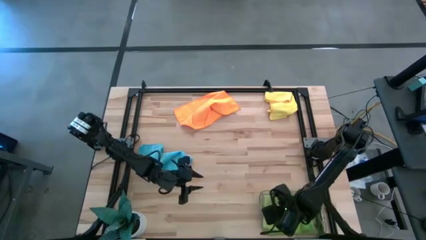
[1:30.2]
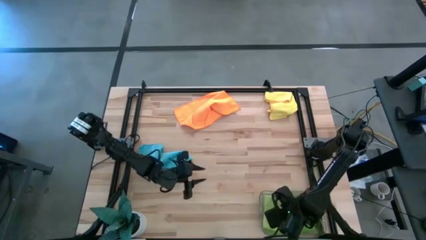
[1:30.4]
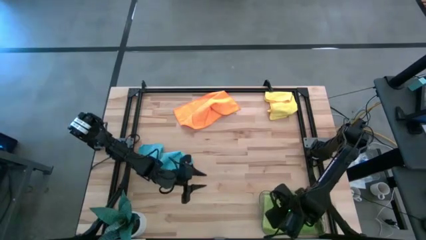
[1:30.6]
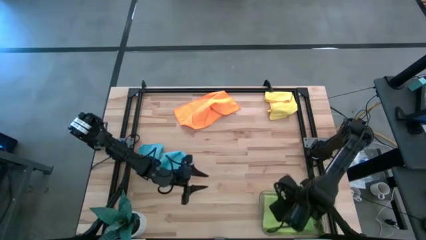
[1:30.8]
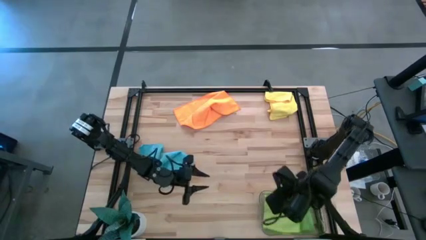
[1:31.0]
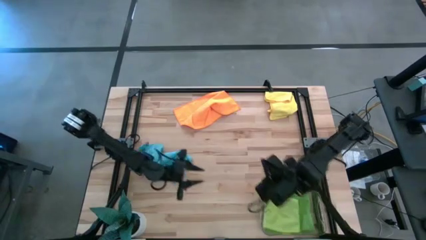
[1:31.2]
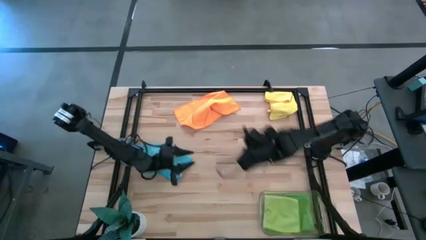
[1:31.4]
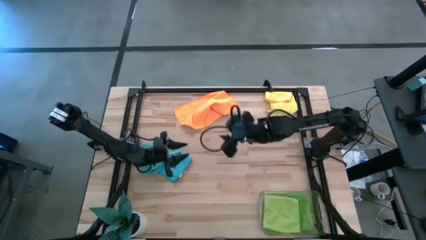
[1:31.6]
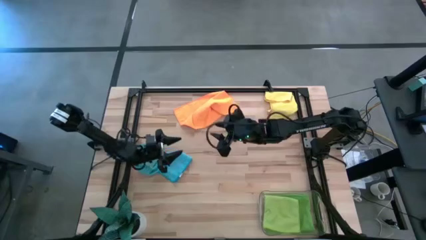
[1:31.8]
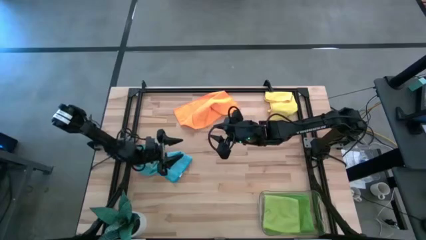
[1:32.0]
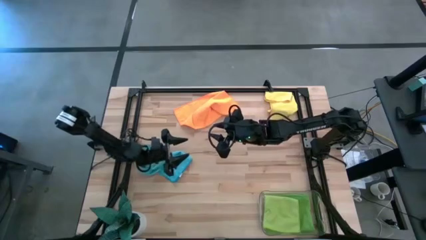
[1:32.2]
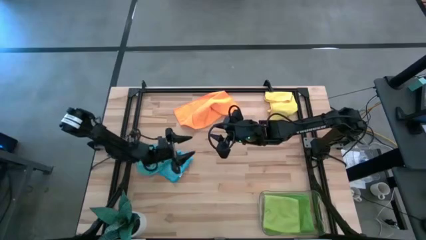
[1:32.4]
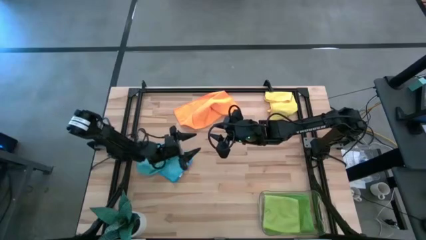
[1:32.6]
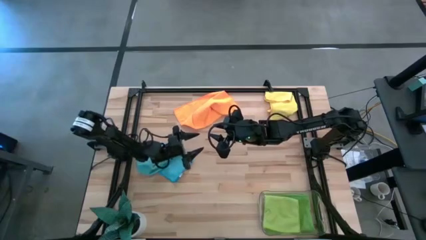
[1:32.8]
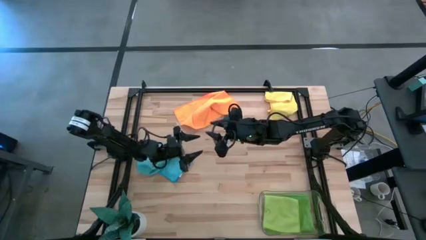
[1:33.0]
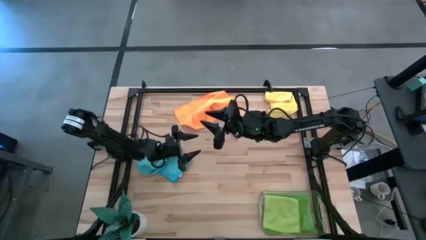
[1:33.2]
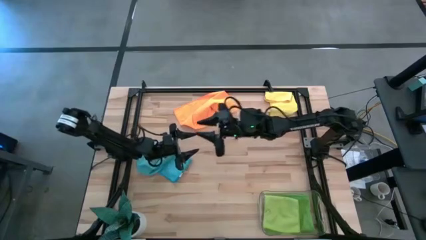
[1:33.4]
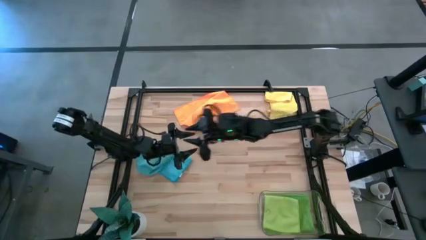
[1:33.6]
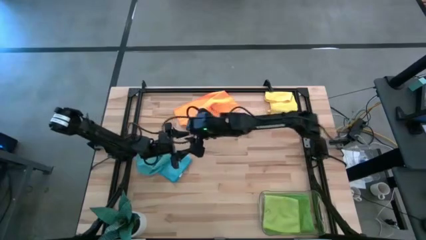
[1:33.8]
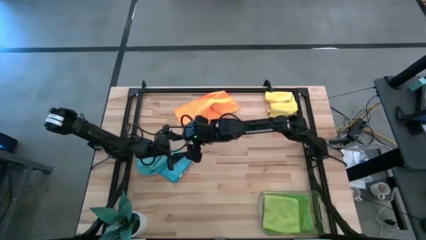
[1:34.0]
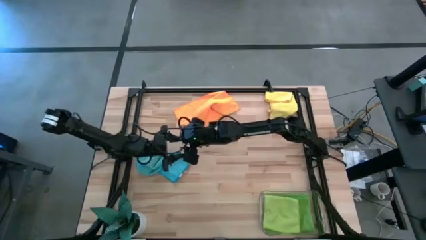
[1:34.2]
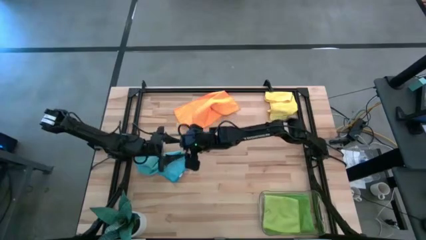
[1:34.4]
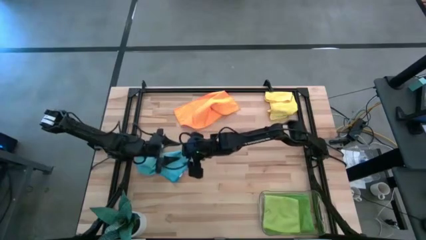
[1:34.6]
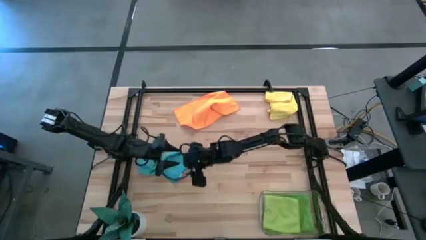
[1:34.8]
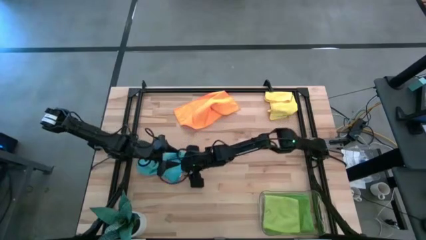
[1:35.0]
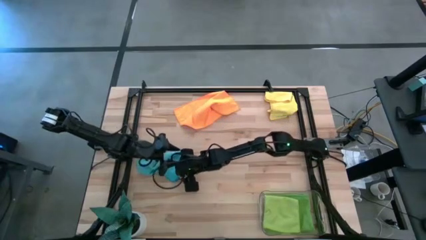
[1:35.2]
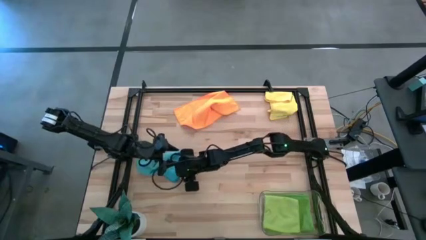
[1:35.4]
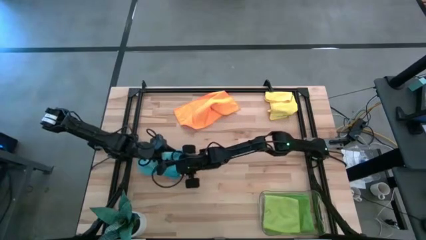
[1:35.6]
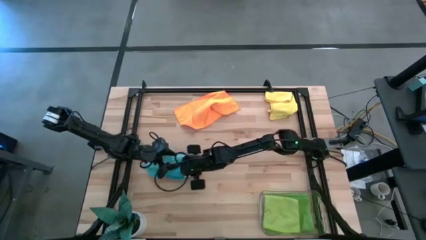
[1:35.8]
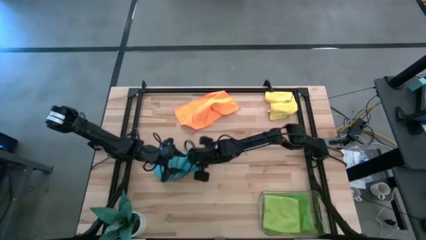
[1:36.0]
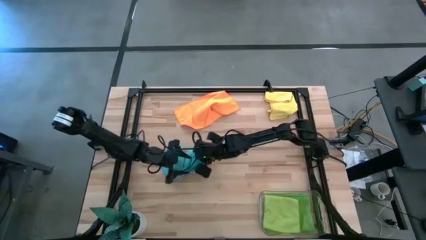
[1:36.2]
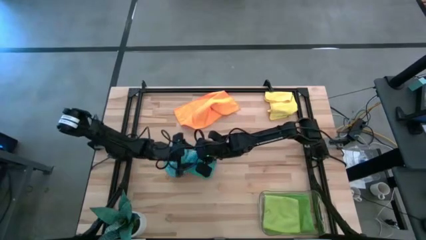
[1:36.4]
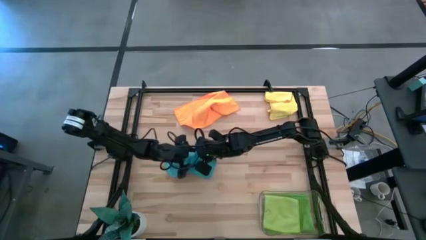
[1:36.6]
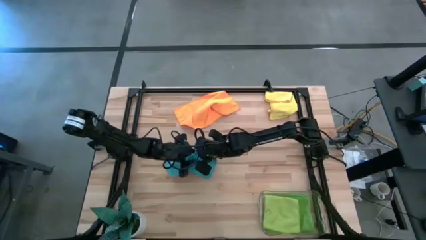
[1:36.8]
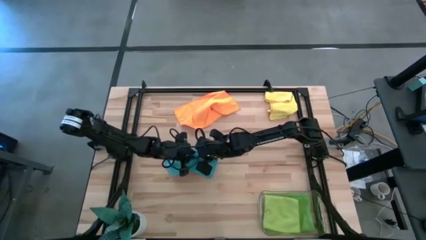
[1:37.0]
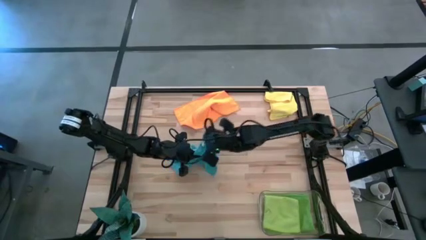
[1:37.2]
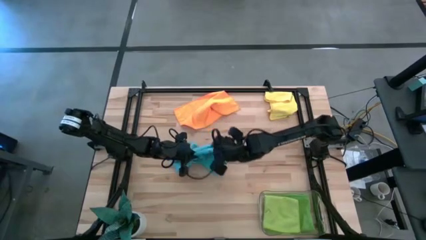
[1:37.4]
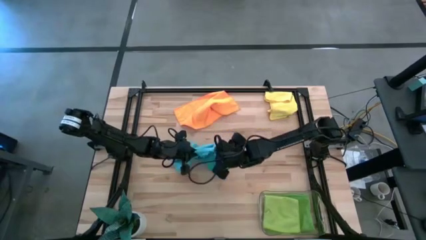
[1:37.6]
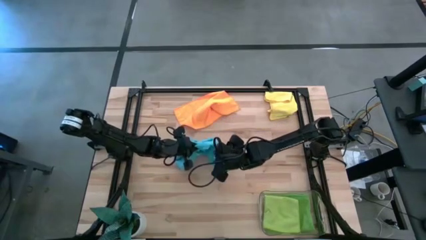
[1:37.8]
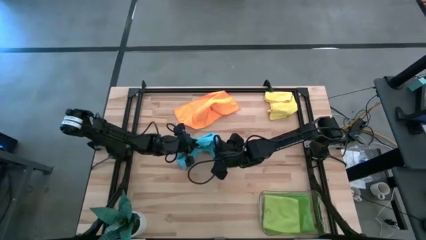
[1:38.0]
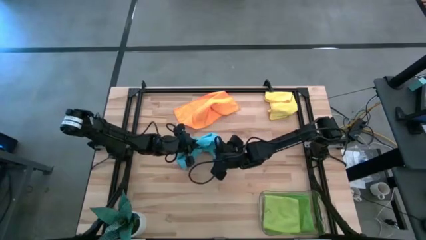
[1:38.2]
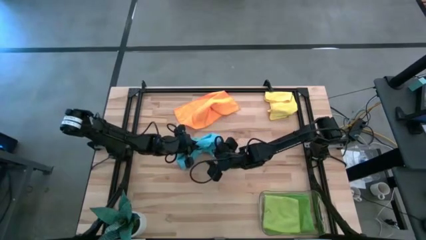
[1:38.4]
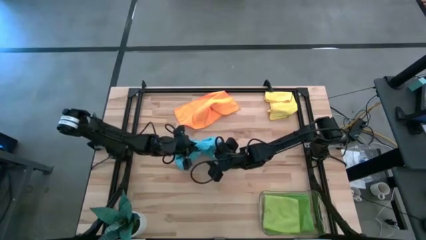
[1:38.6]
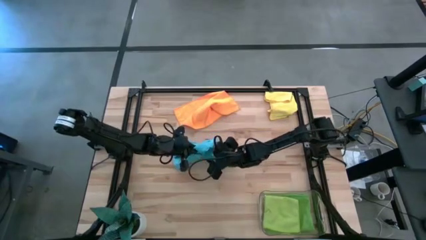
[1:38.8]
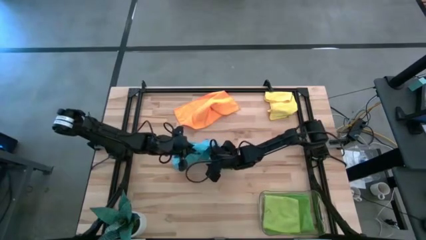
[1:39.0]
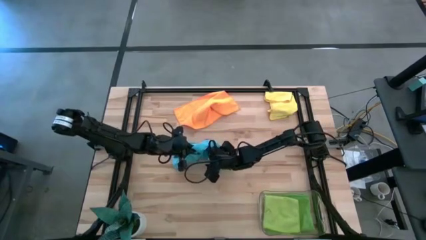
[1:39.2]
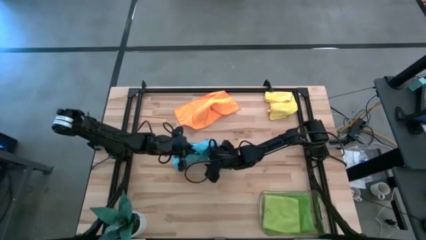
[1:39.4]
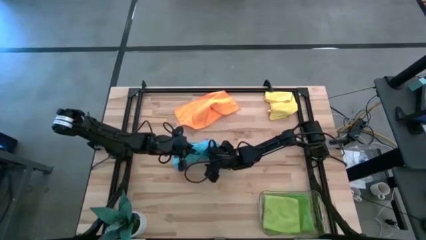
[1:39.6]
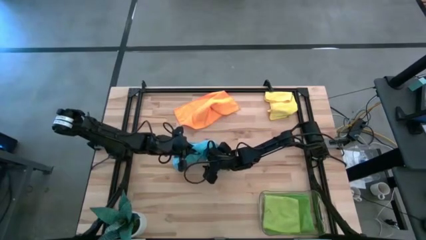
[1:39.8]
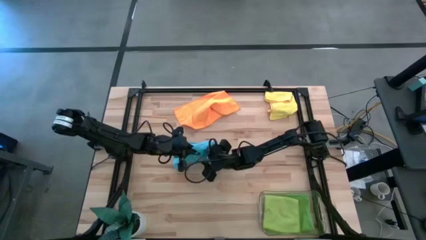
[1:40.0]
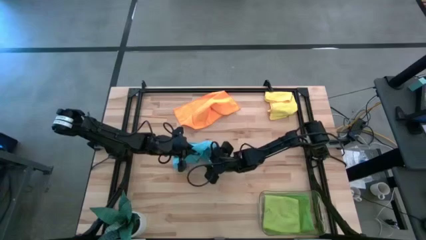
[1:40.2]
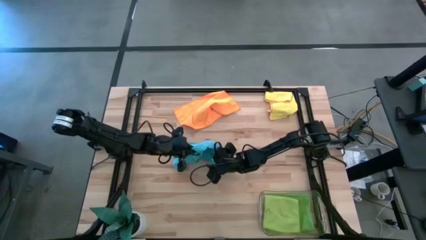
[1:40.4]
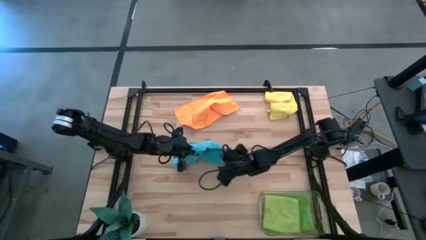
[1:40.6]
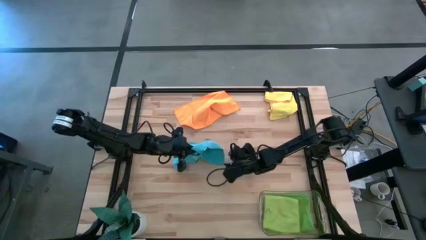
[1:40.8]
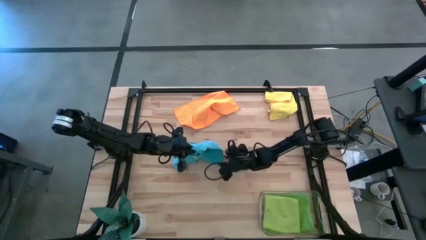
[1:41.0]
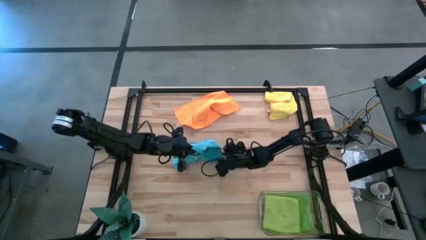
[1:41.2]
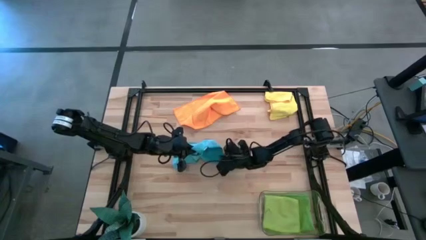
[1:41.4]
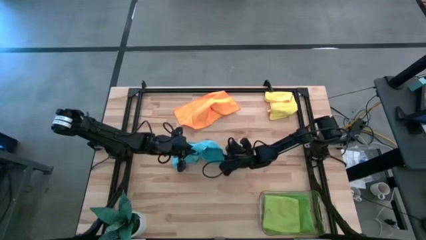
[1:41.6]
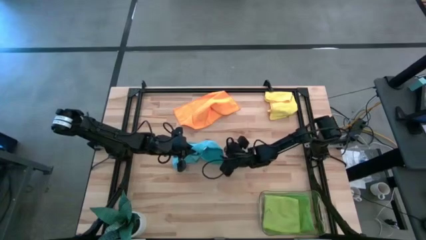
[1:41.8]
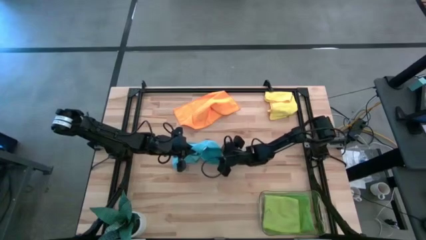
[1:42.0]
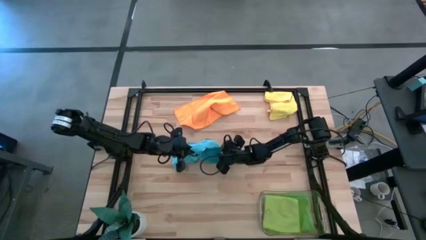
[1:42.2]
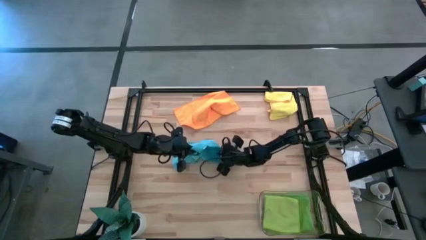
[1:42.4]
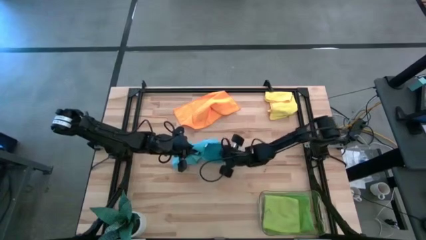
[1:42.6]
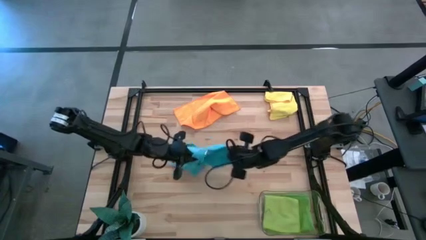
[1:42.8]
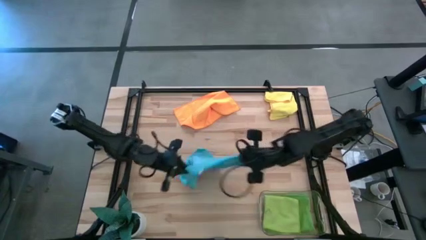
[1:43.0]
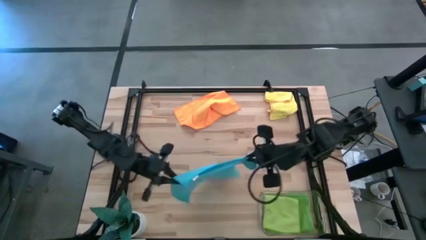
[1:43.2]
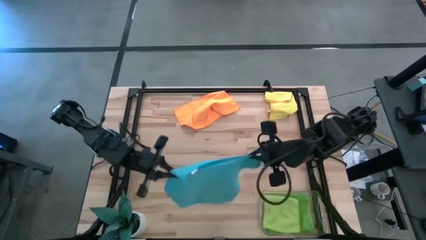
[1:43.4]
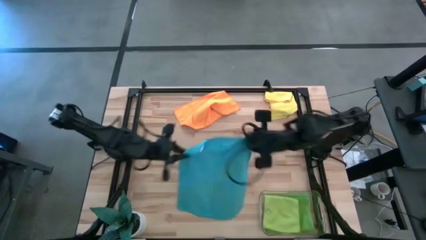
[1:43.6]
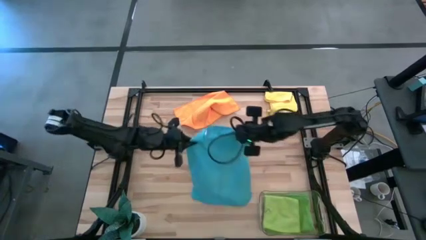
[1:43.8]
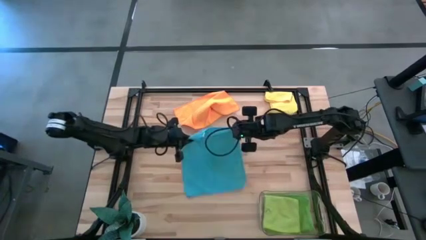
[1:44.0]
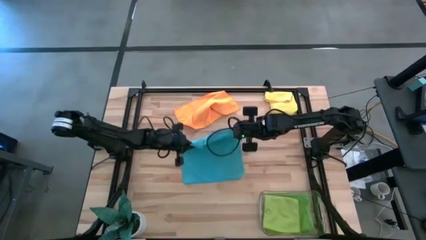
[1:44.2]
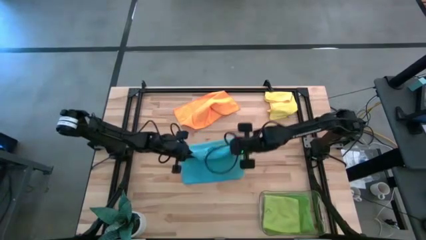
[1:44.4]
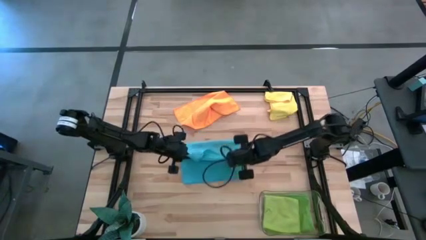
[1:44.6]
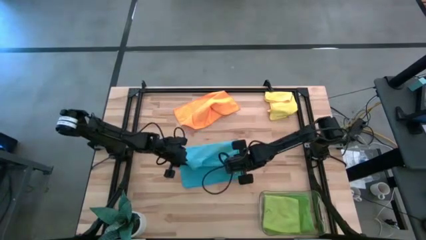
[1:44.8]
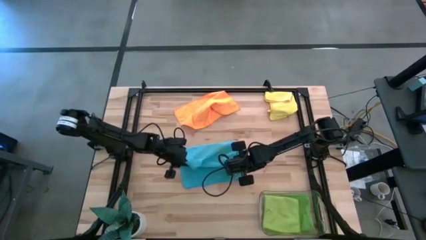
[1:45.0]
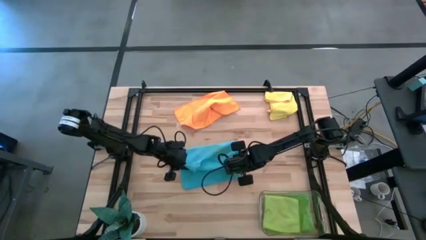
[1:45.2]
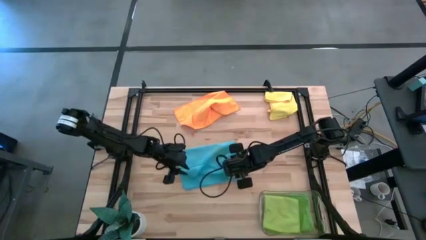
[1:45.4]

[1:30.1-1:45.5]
Task: Fold microfiber towels
Fold the blue microfiber towel
